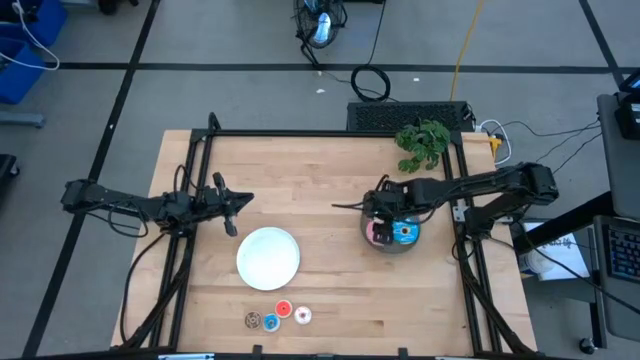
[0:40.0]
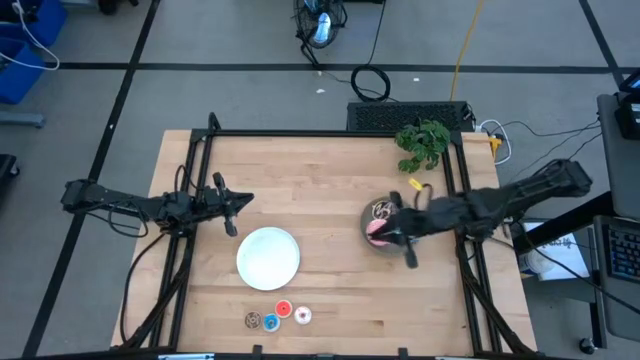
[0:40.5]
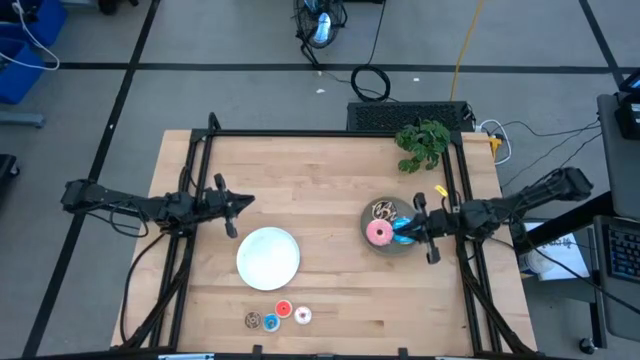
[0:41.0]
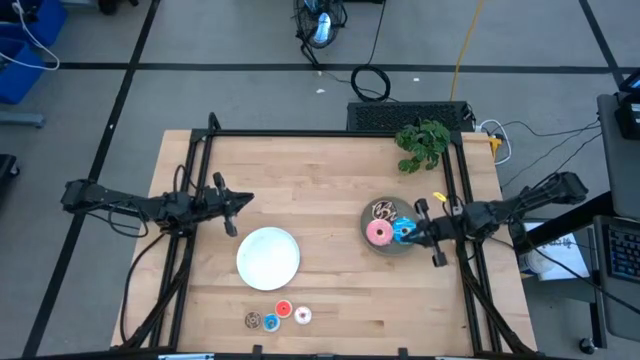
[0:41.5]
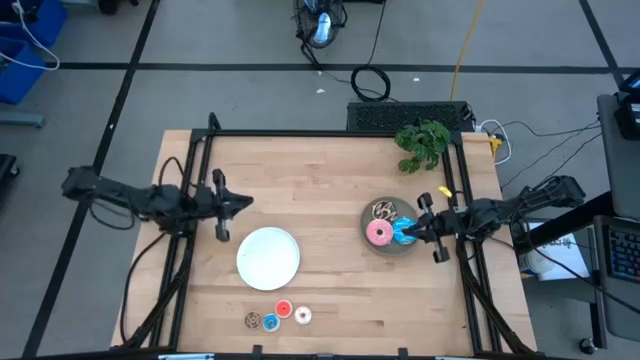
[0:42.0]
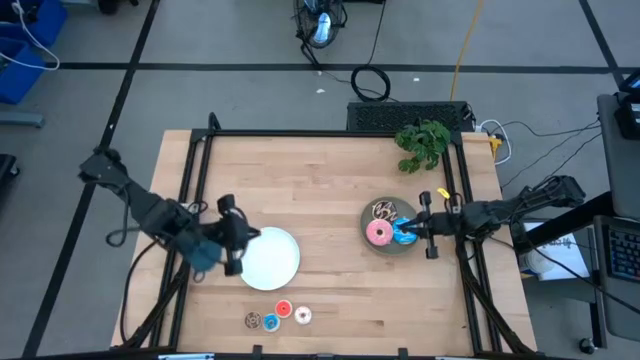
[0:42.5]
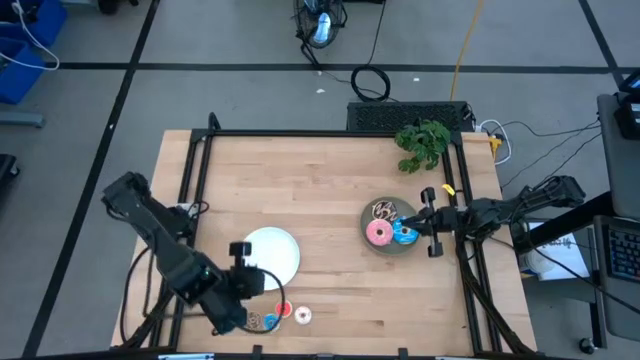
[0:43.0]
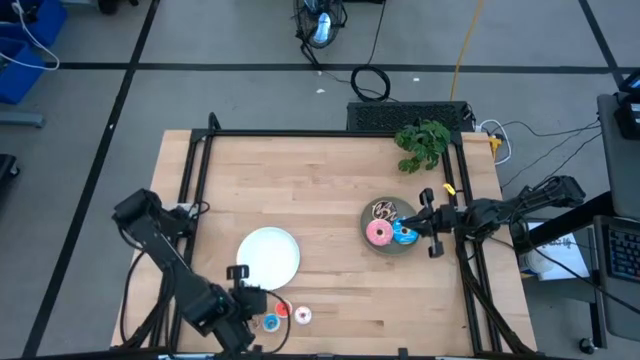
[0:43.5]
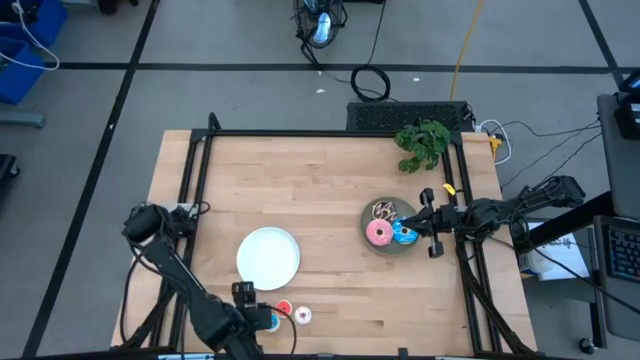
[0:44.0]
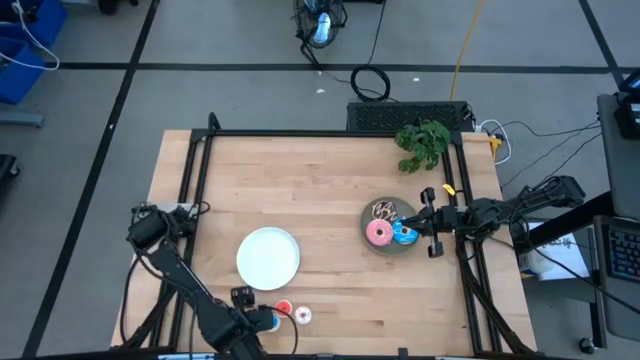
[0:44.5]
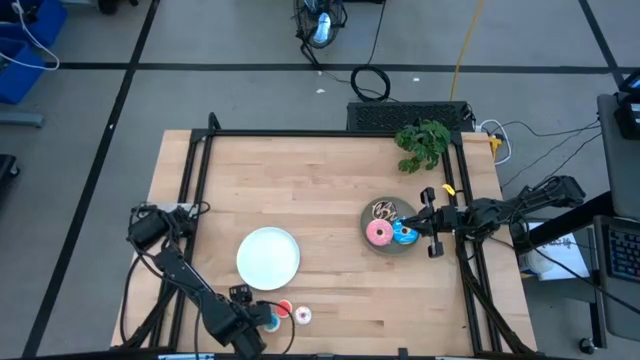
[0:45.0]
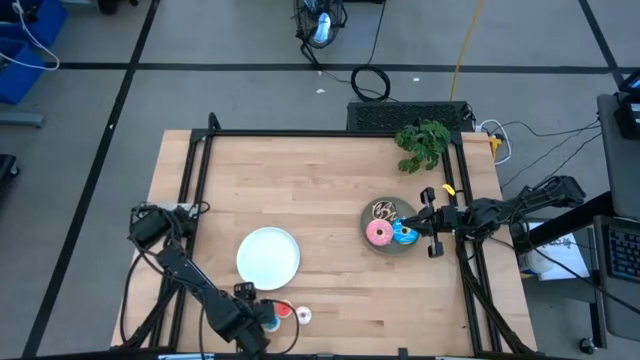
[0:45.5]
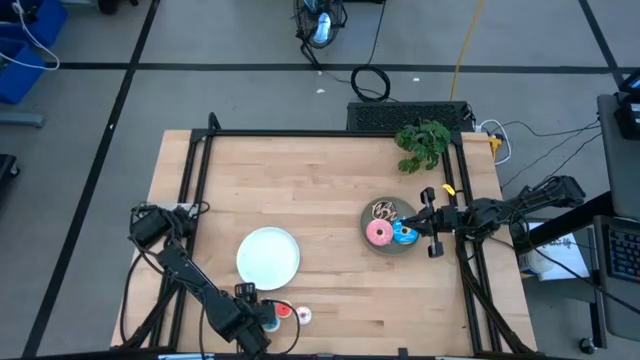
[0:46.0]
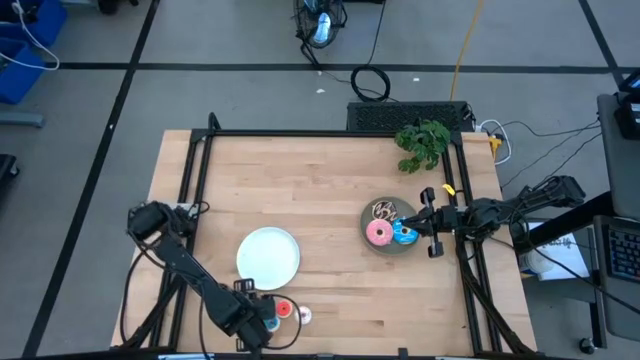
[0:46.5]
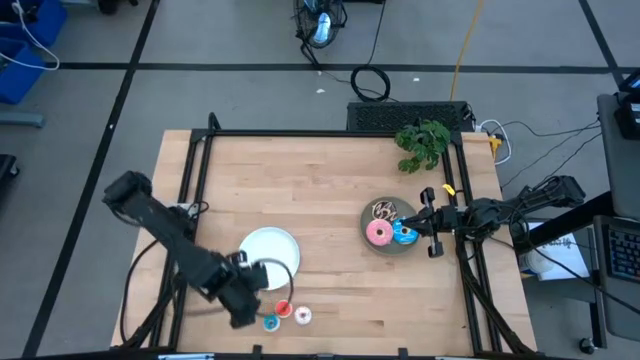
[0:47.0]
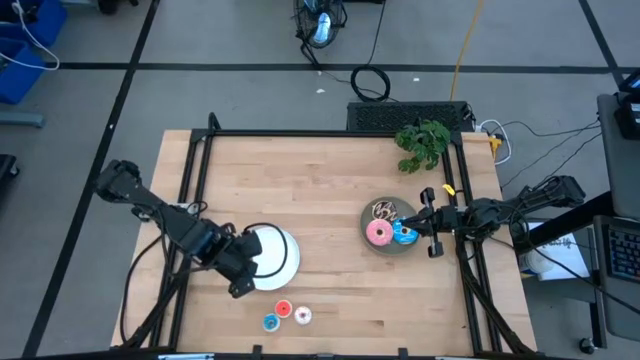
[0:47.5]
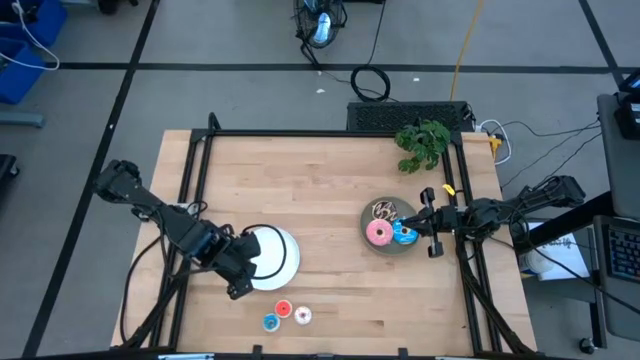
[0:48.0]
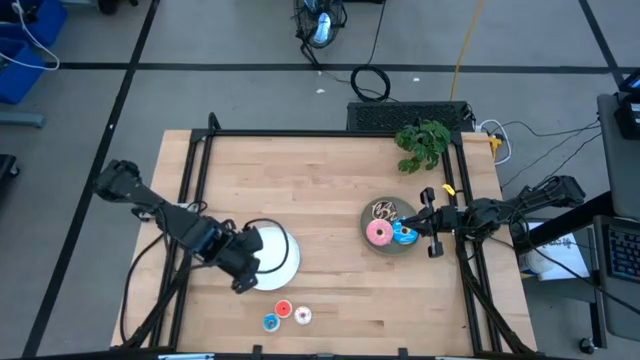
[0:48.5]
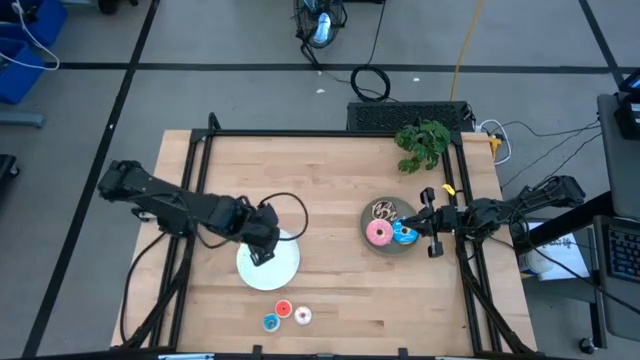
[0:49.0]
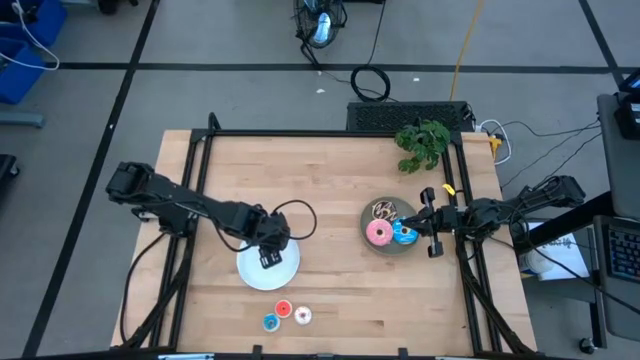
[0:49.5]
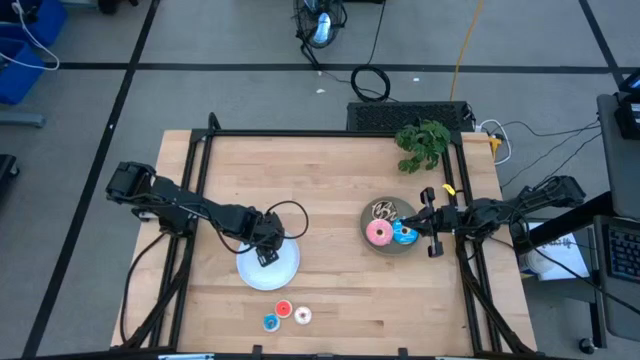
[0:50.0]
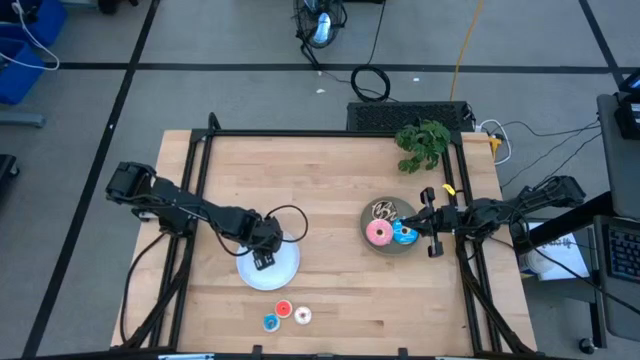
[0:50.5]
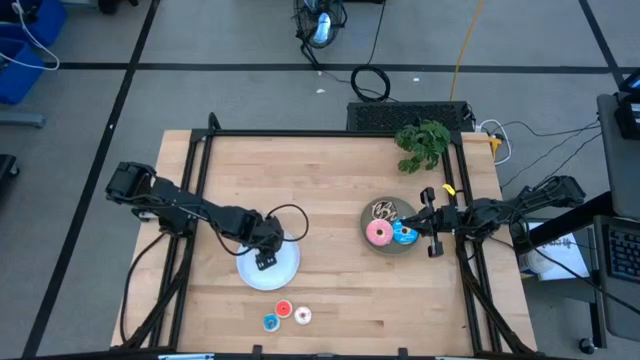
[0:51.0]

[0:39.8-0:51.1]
Task: Pick & Place donuts
Put the small brown donut on the white plate

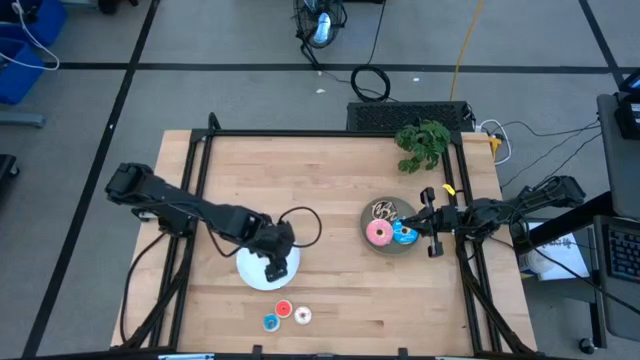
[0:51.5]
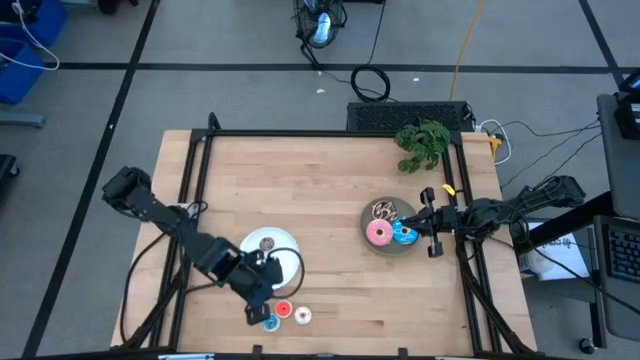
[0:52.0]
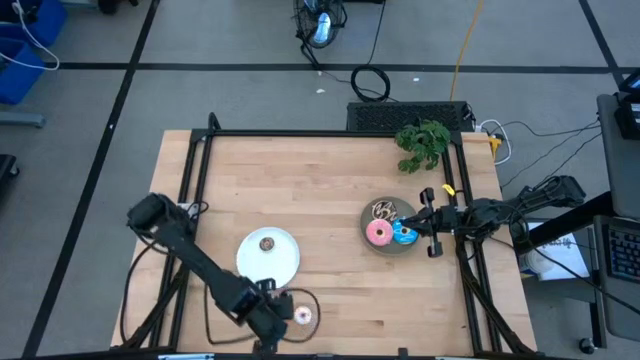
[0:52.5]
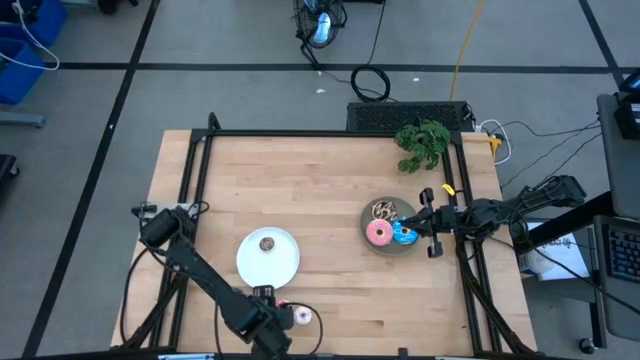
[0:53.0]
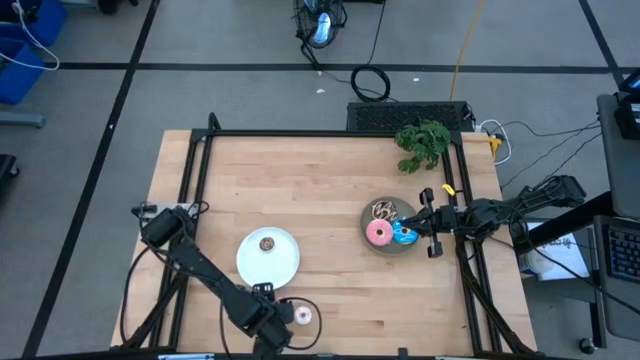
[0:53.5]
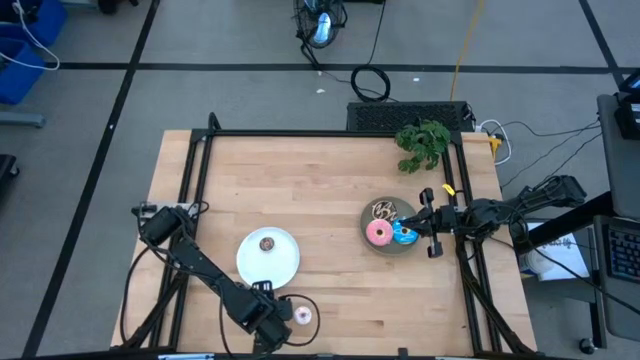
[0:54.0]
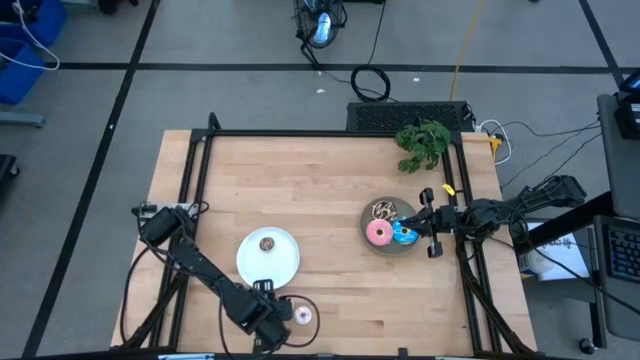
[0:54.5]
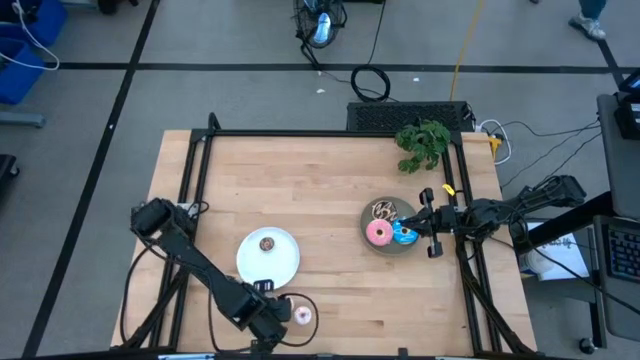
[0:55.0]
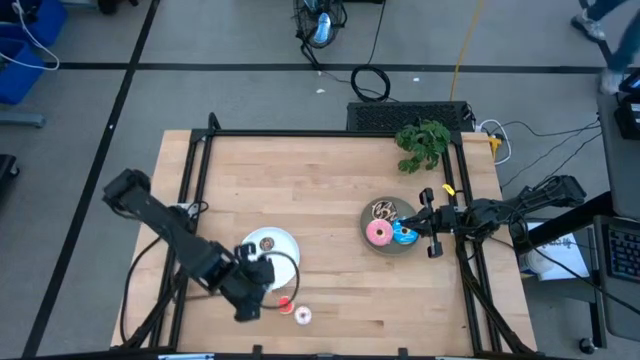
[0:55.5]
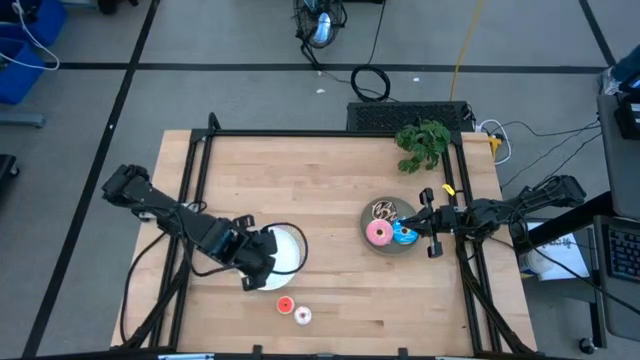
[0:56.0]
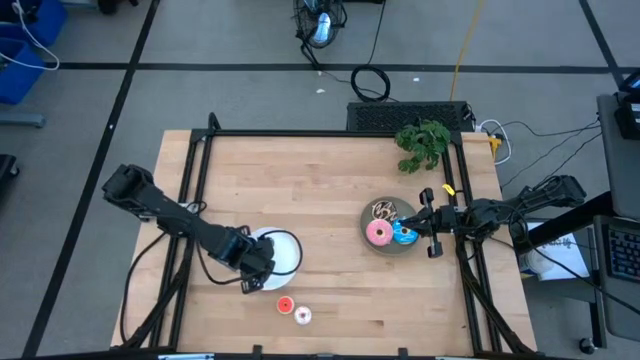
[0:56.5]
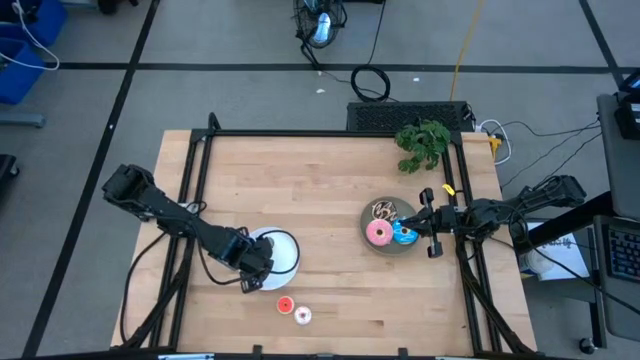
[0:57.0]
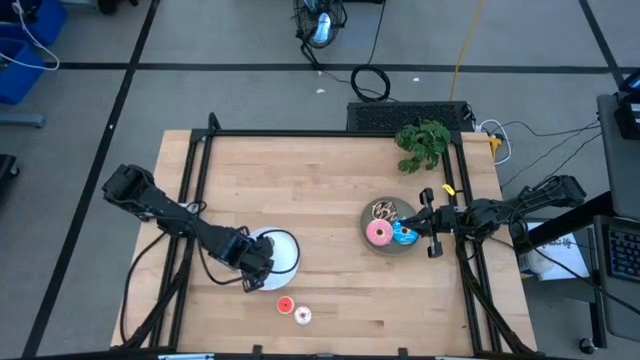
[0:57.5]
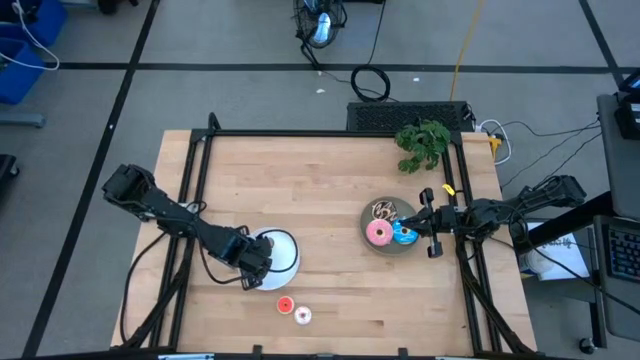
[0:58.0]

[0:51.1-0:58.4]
Put the small blue donut on the white plate

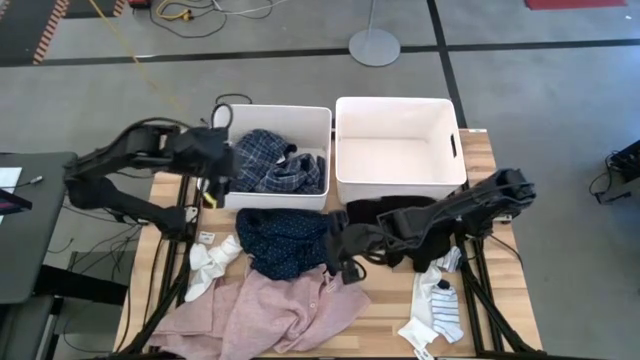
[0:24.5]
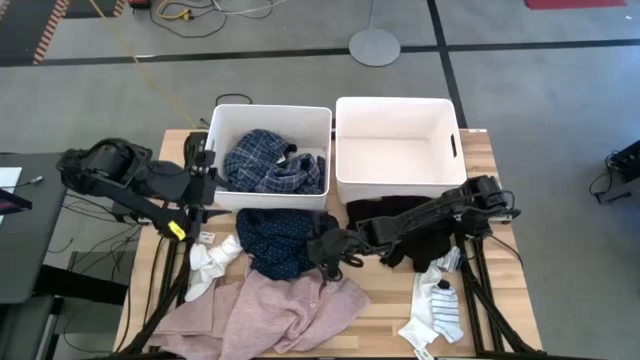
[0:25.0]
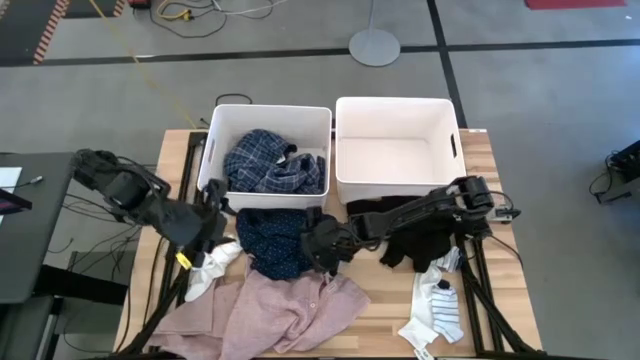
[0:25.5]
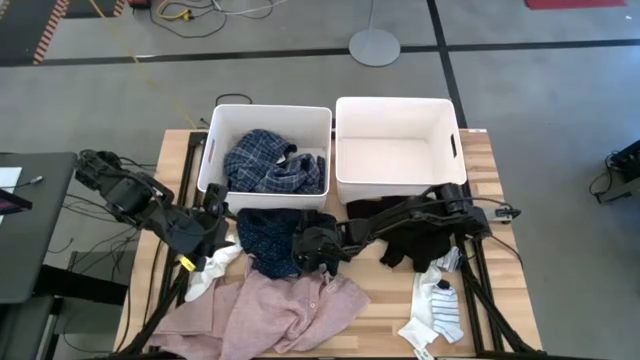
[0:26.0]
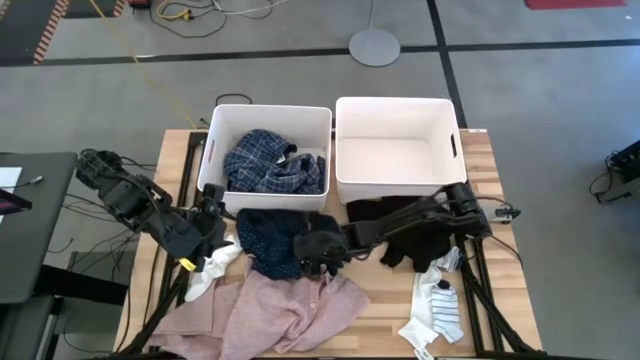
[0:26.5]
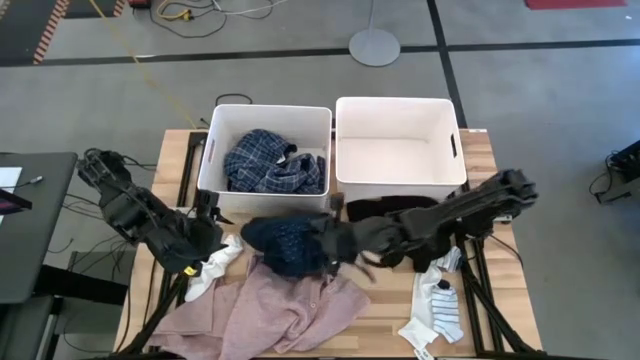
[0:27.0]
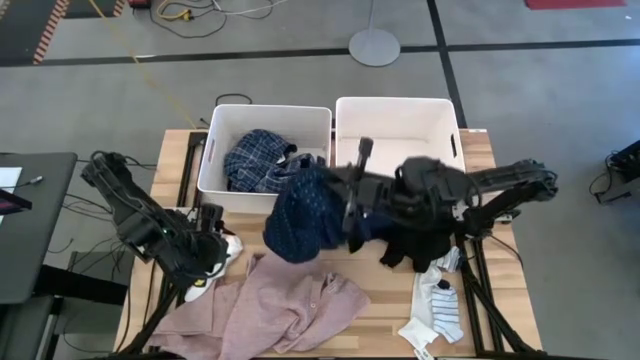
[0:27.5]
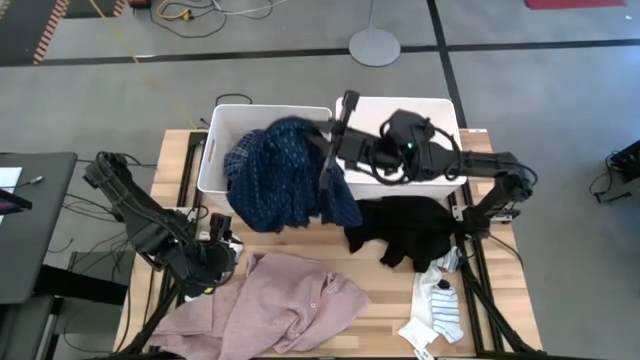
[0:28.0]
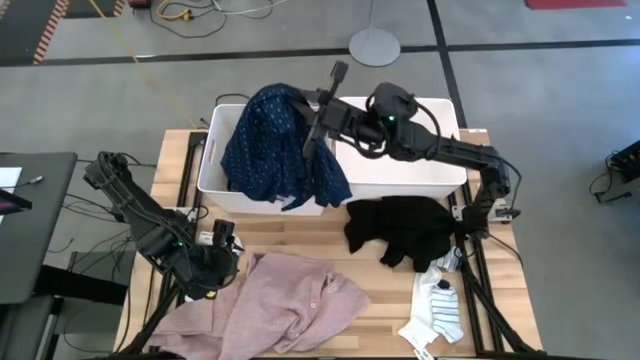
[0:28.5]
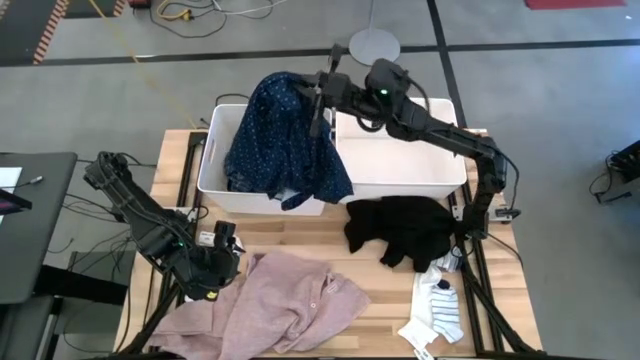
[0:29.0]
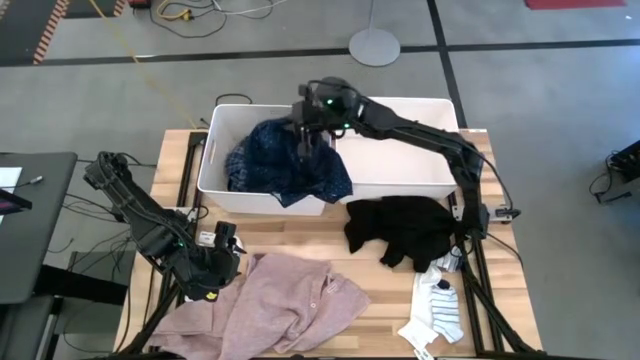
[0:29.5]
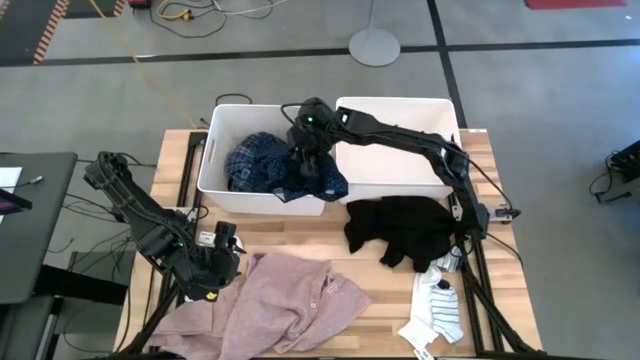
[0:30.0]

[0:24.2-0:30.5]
Task: Sort clothes
Put the dark blue shirt into the left white laundry bin
